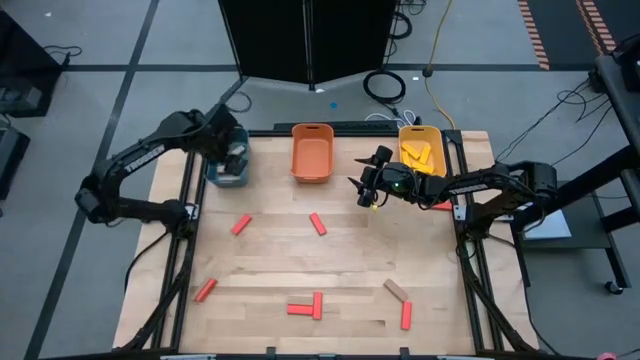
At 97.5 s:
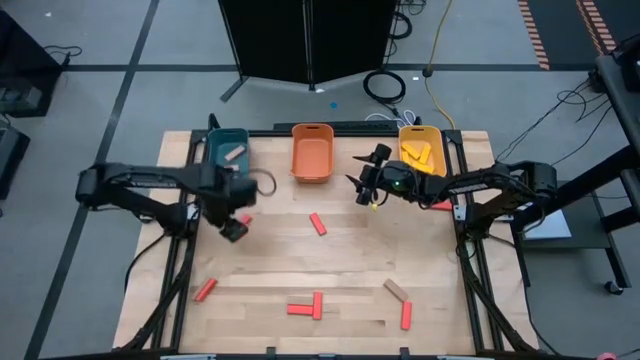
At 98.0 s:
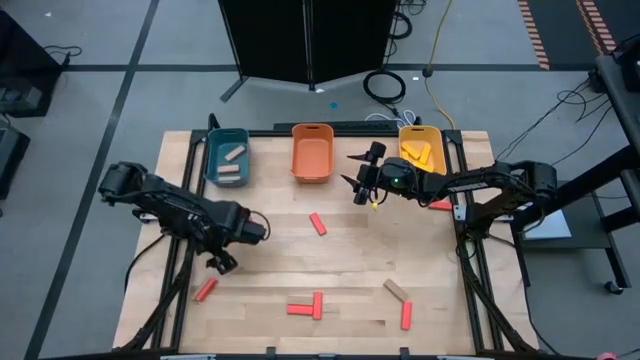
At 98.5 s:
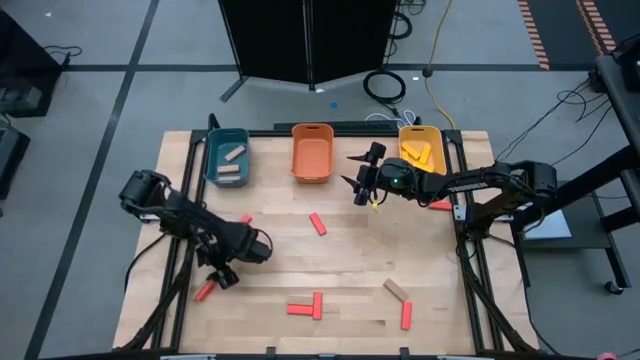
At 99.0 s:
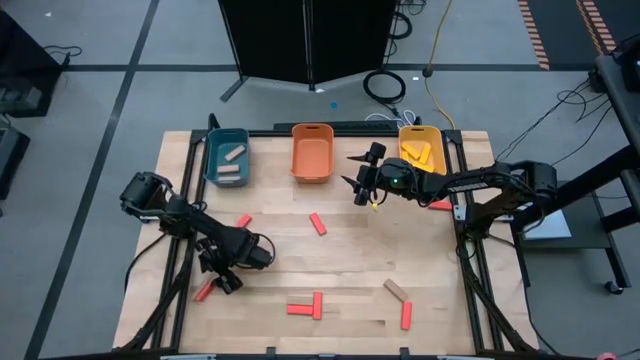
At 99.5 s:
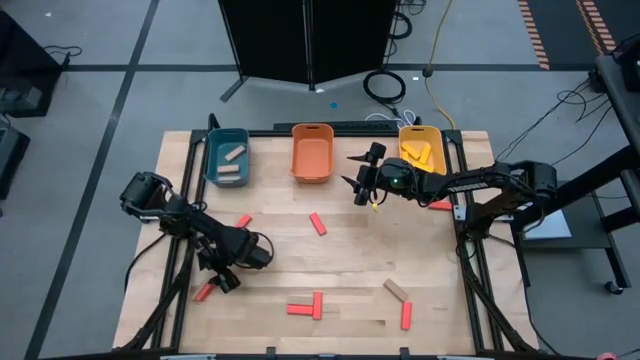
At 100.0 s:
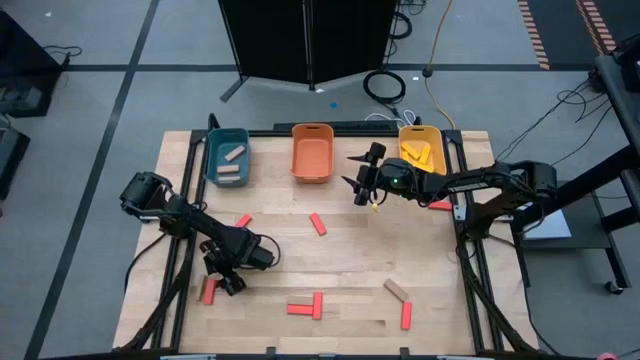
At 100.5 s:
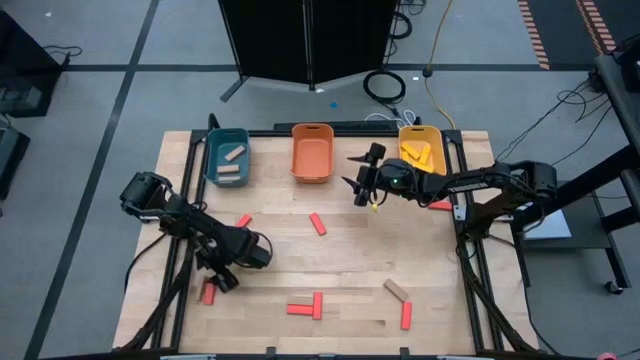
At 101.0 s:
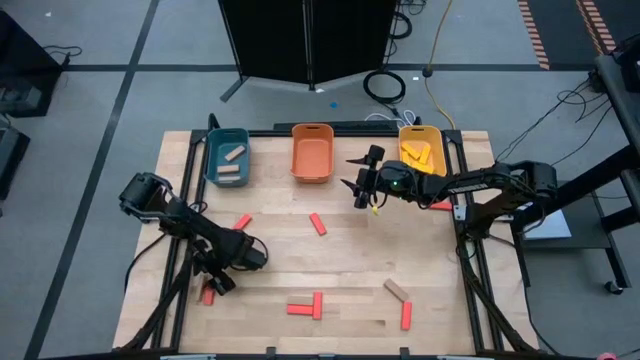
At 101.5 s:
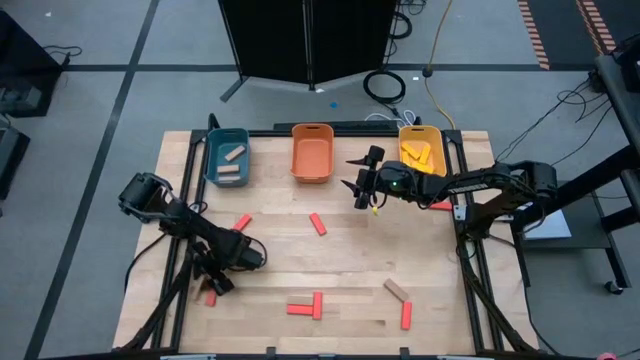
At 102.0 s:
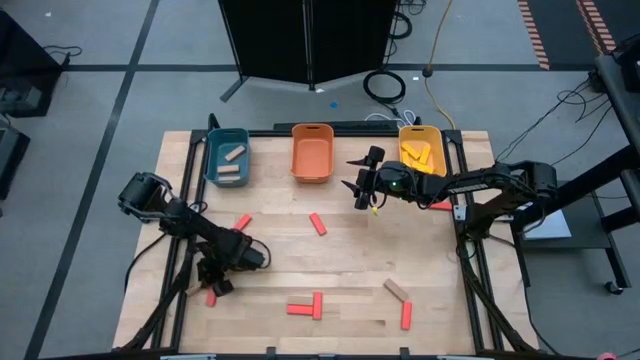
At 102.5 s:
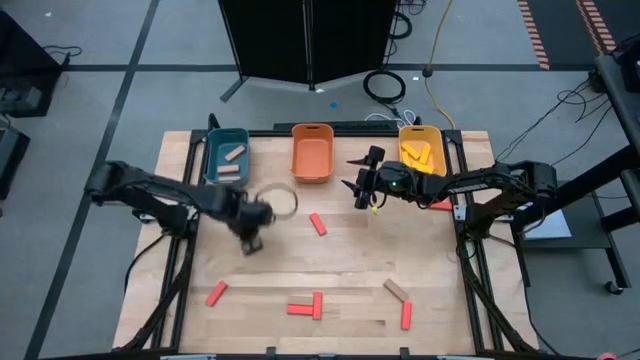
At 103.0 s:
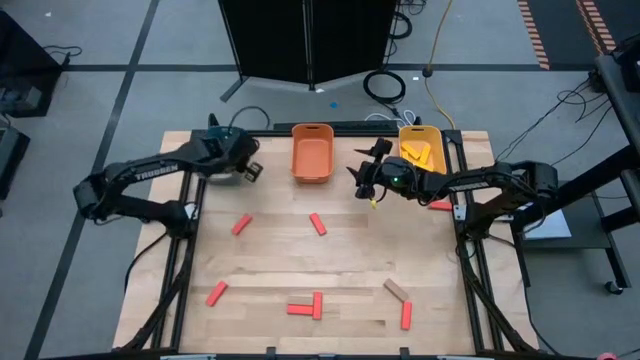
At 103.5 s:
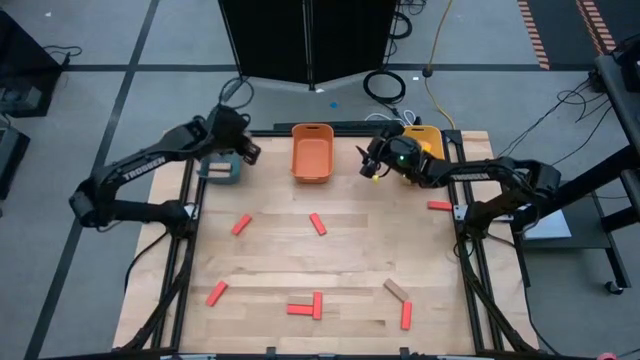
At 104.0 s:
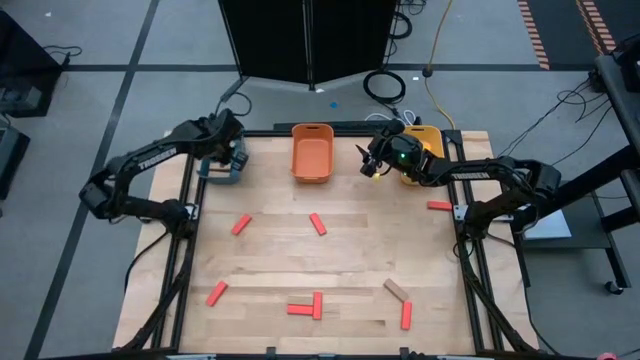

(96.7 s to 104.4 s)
Task: Sort blocks
Put the brown block into the blue bin

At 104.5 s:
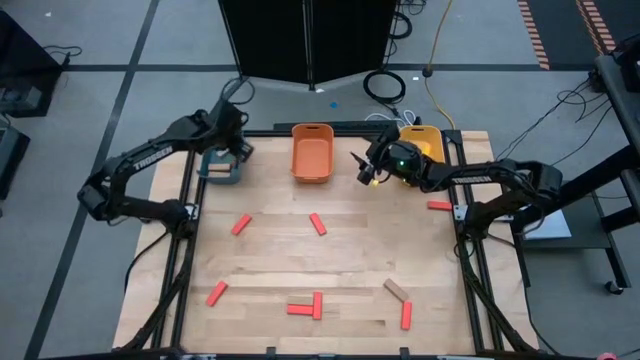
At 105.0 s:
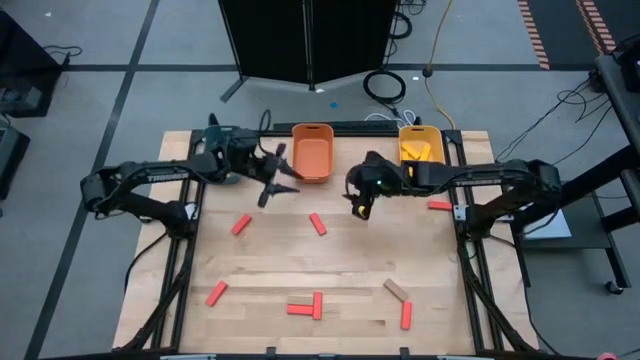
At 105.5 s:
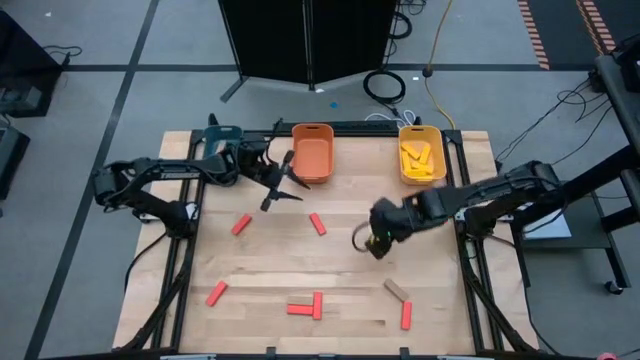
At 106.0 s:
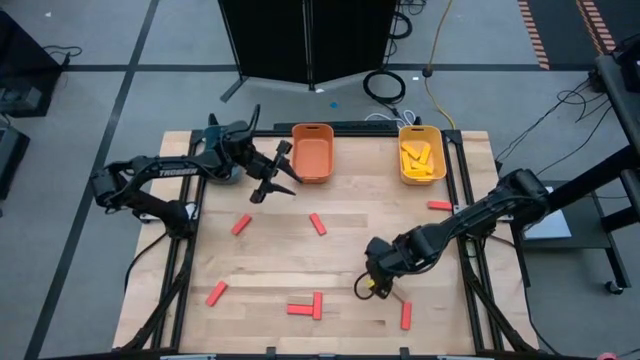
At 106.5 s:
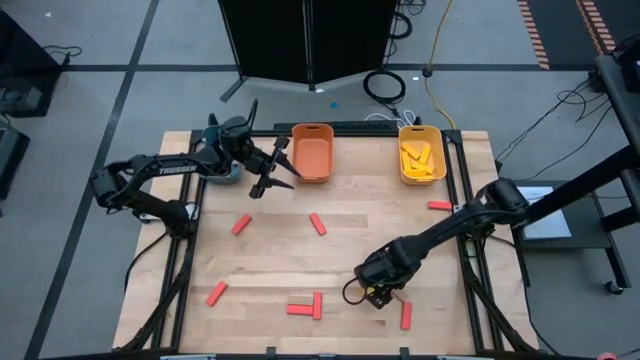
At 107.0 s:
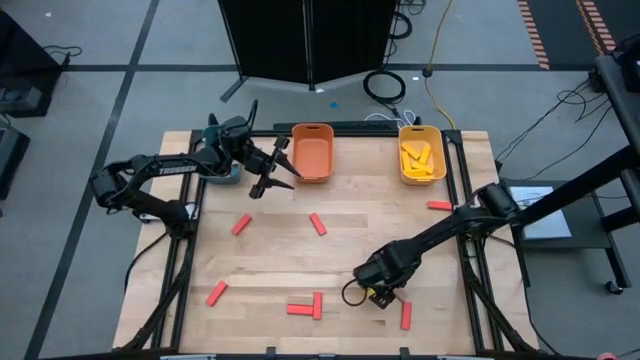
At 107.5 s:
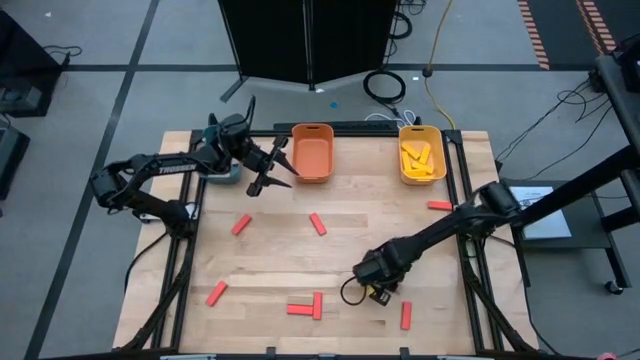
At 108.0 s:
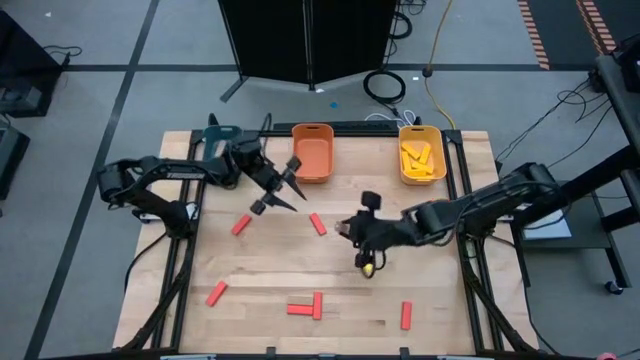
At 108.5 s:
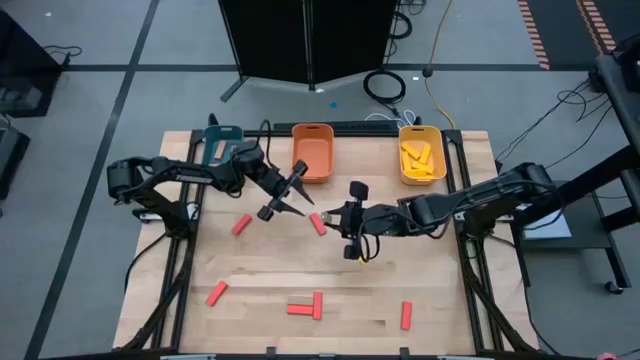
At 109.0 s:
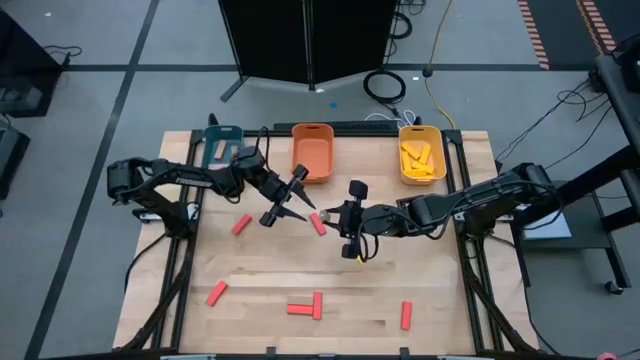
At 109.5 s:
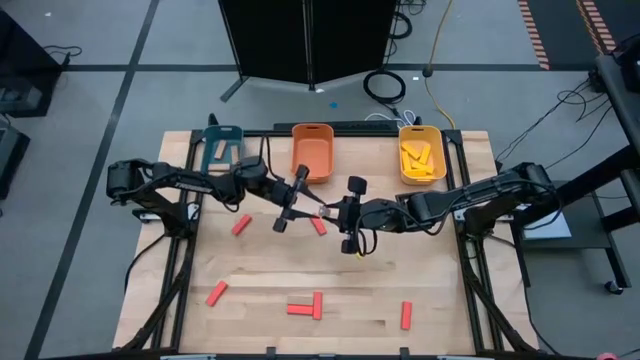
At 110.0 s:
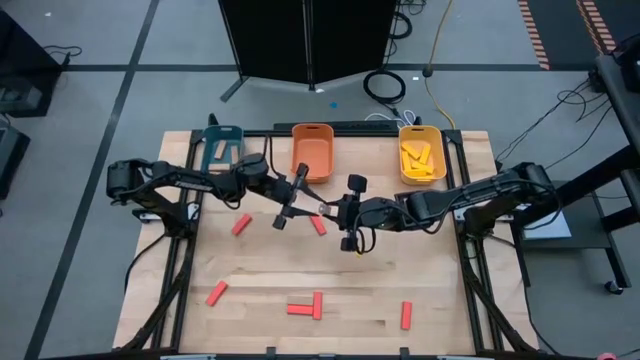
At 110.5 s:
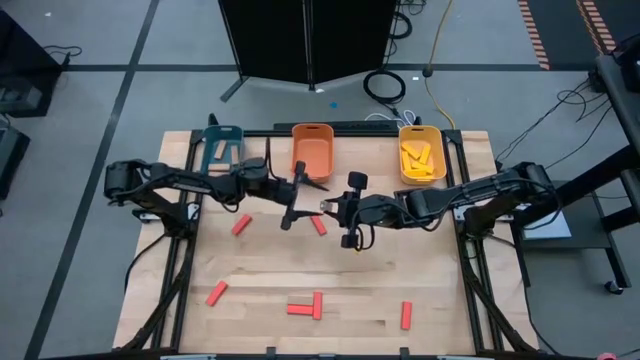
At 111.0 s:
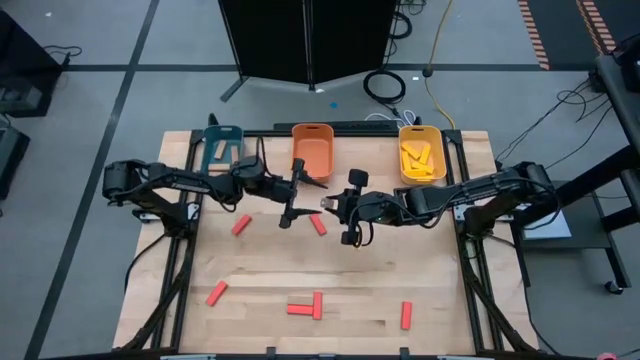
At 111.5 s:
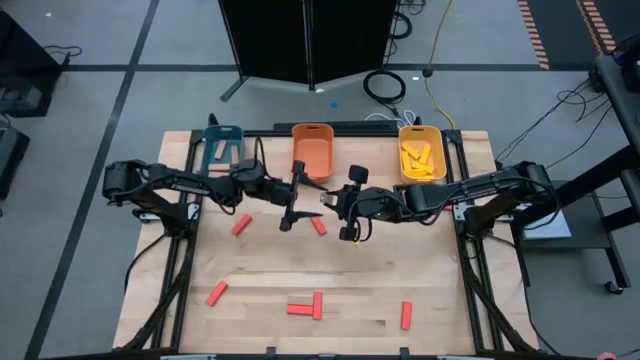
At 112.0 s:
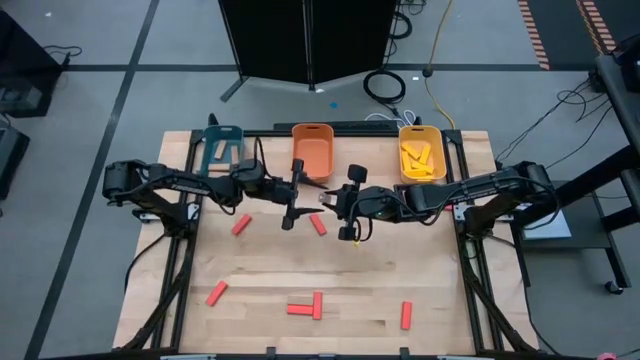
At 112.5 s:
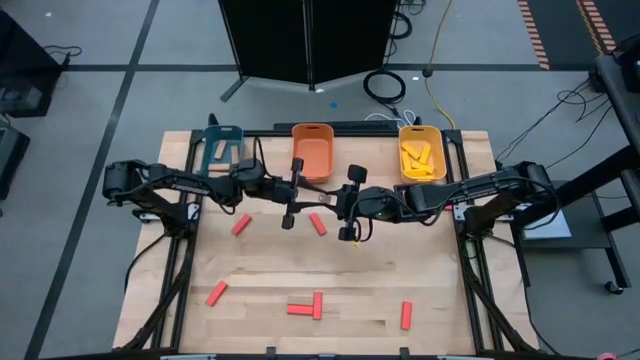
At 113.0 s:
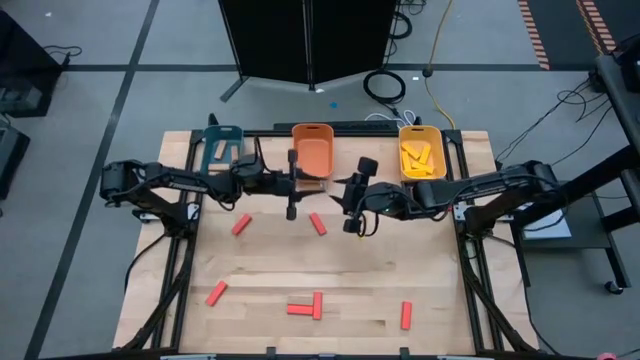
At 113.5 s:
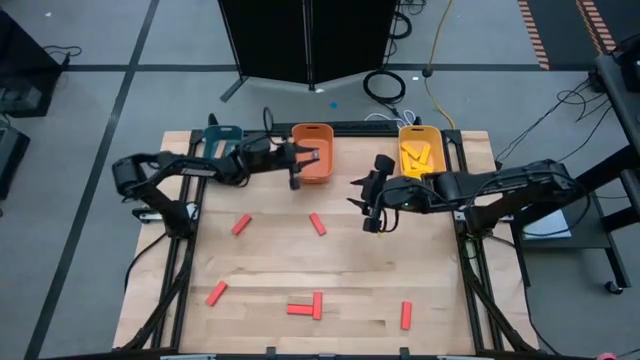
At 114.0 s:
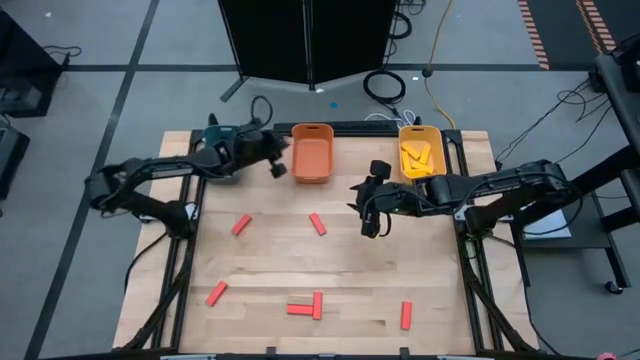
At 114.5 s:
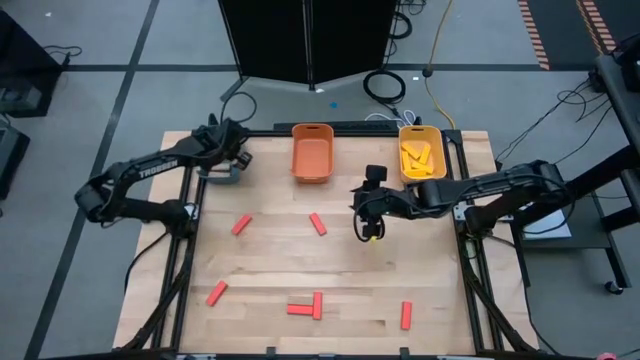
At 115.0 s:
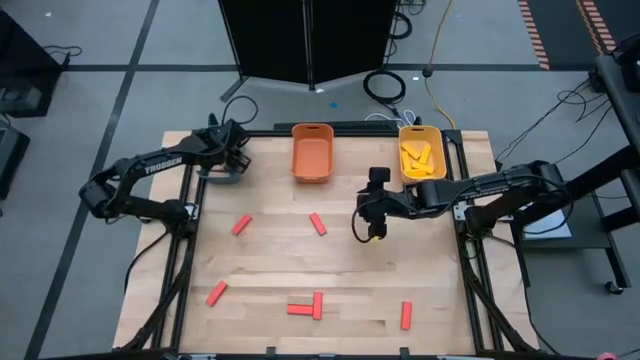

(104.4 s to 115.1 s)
Put the brown block into the blue bin

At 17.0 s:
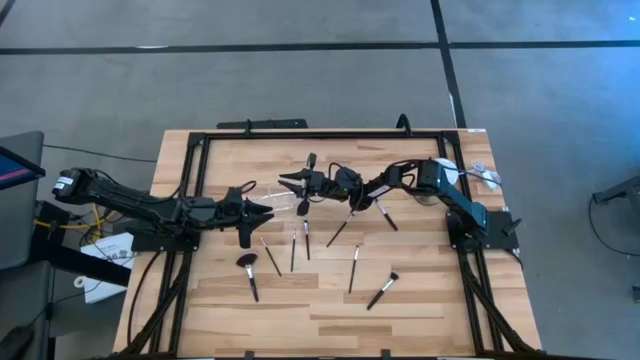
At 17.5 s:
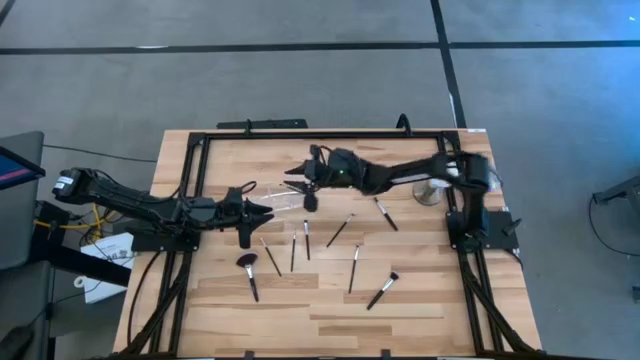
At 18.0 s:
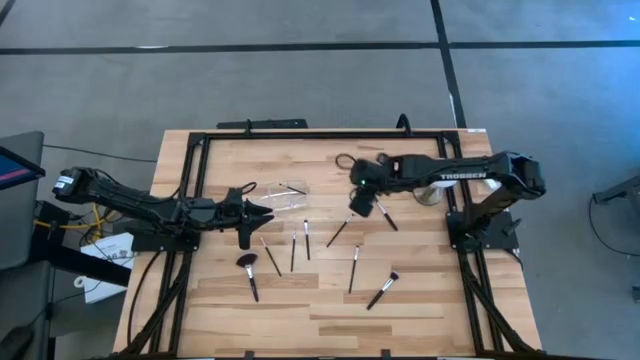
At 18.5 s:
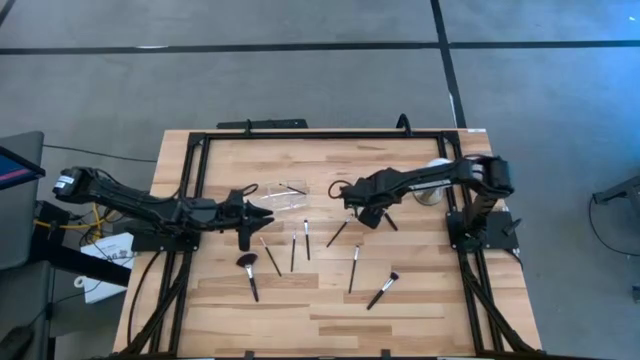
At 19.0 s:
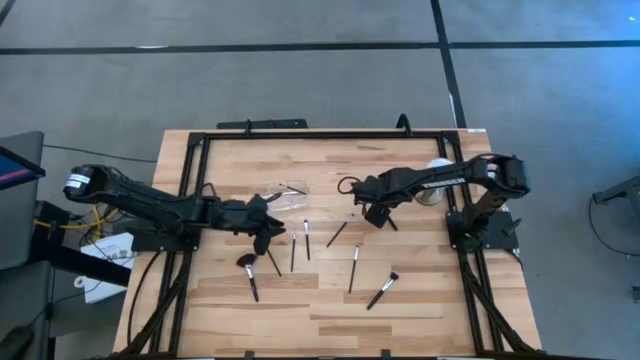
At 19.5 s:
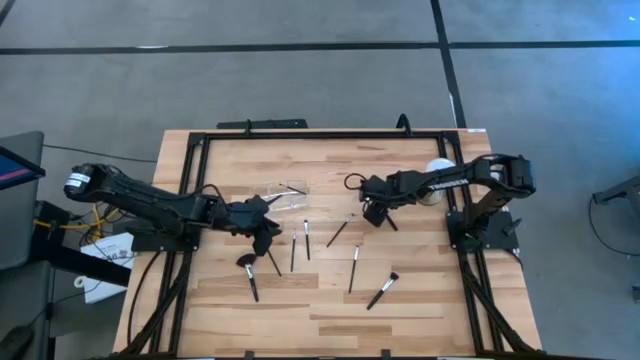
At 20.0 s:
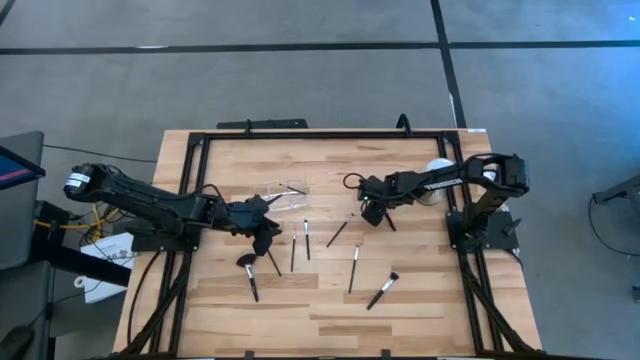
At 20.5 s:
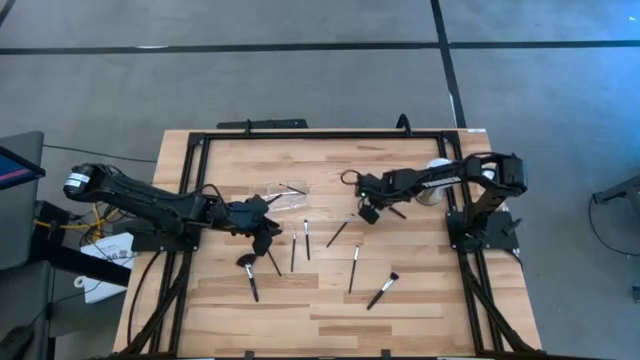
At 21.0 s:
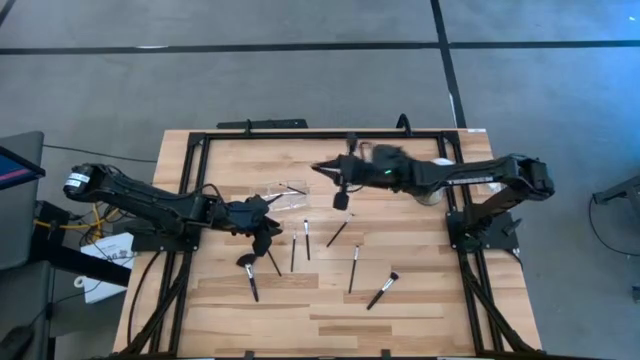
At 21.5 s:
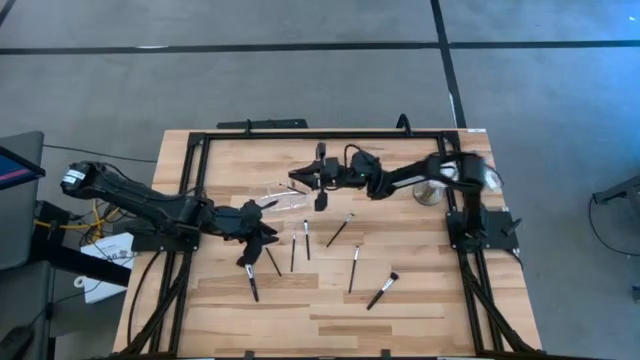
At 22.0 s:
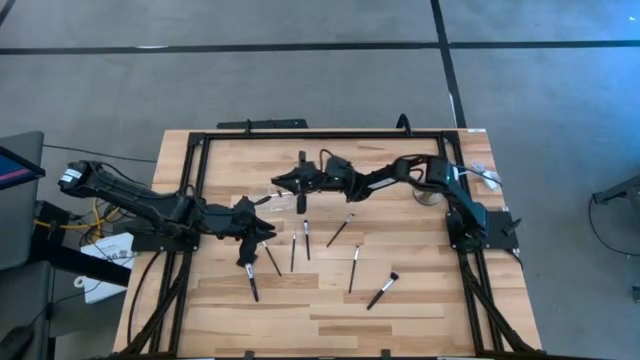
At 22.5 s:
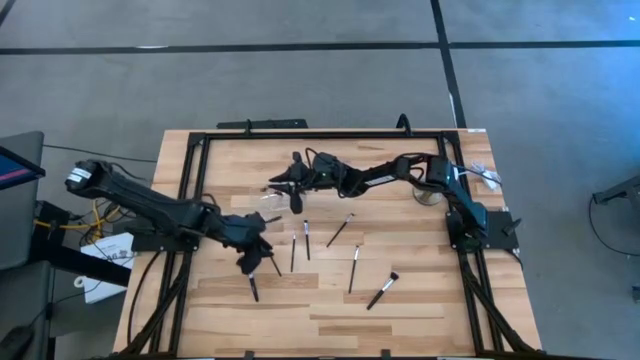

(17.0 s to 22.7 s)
Task: Put items in baskets/containers
Put the foundation brush into the transparent organizer
